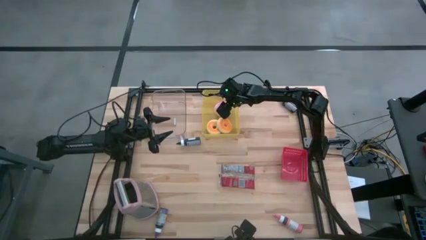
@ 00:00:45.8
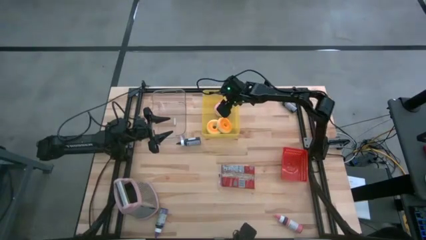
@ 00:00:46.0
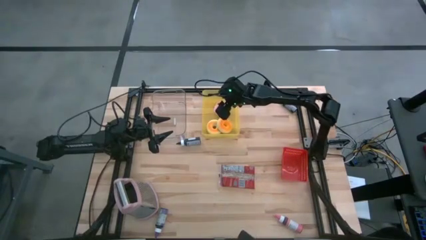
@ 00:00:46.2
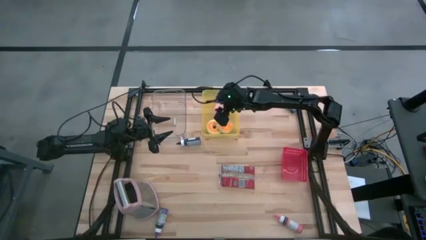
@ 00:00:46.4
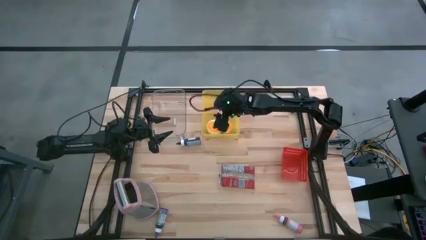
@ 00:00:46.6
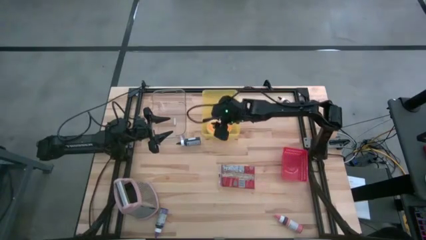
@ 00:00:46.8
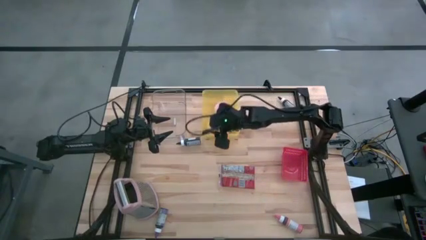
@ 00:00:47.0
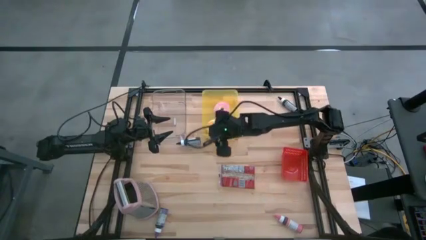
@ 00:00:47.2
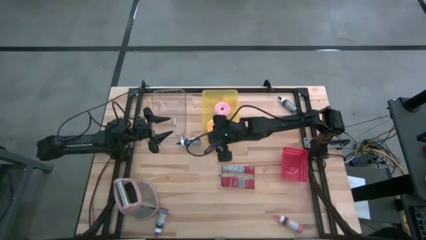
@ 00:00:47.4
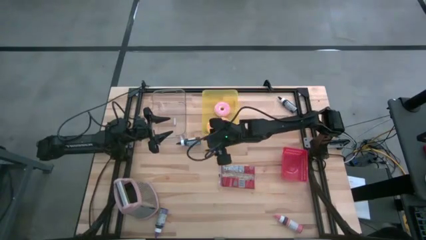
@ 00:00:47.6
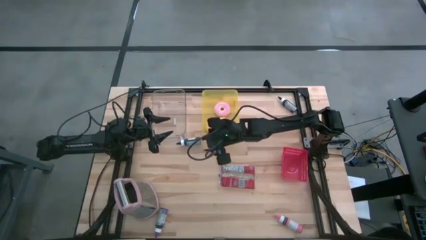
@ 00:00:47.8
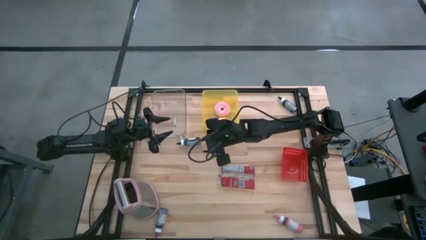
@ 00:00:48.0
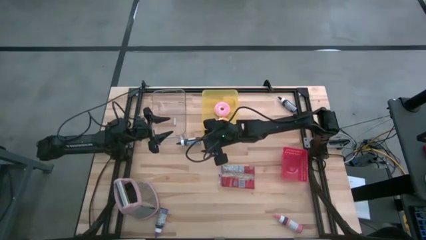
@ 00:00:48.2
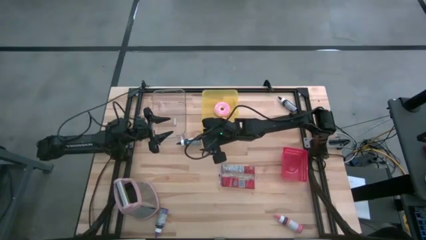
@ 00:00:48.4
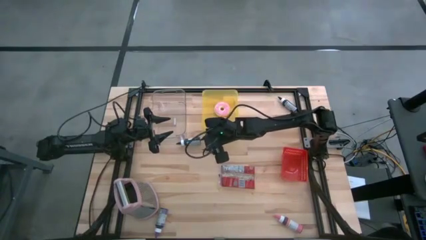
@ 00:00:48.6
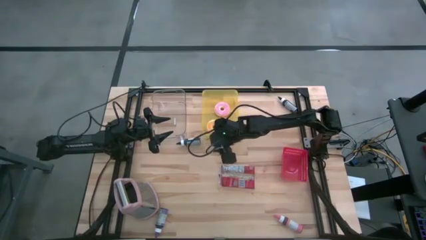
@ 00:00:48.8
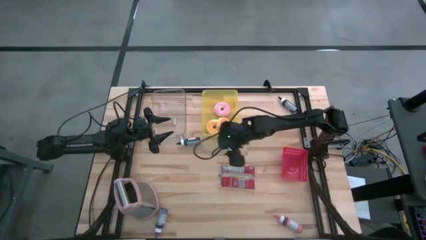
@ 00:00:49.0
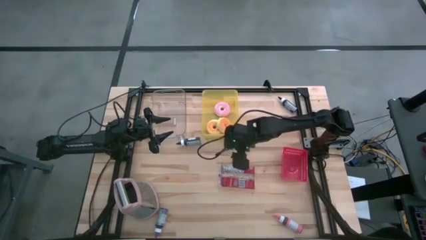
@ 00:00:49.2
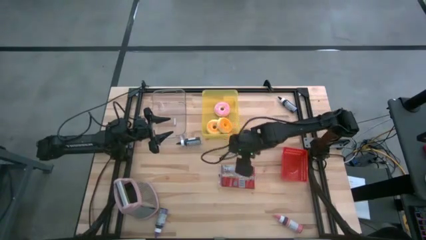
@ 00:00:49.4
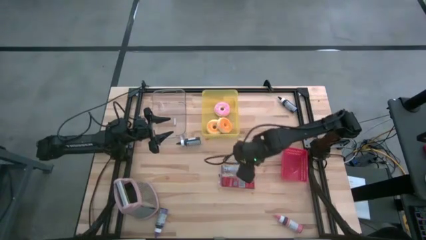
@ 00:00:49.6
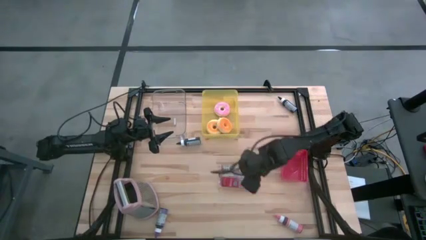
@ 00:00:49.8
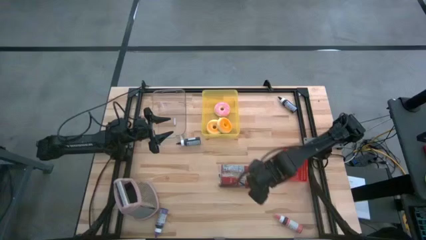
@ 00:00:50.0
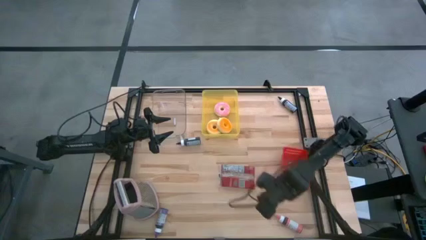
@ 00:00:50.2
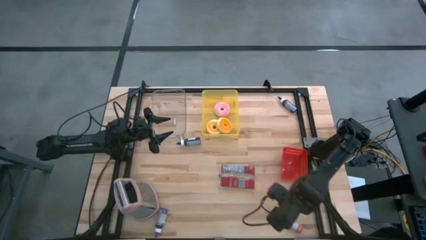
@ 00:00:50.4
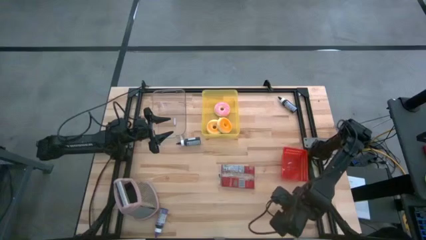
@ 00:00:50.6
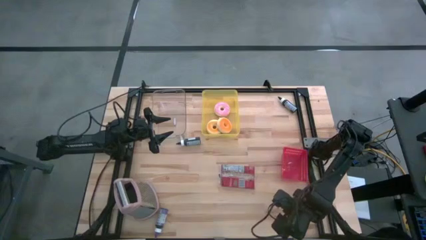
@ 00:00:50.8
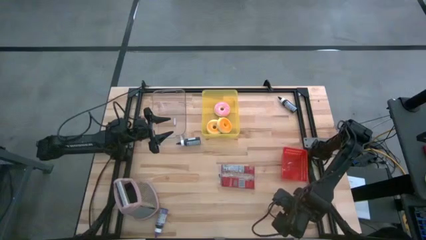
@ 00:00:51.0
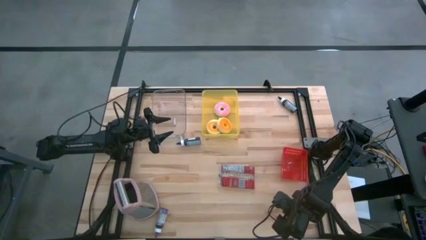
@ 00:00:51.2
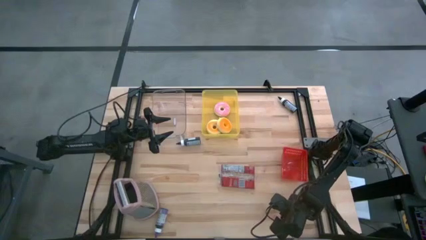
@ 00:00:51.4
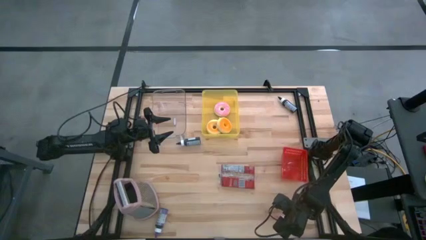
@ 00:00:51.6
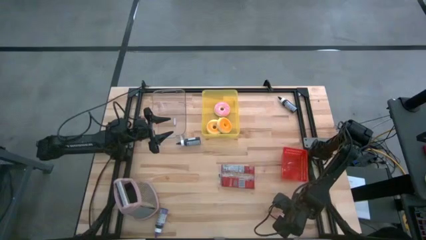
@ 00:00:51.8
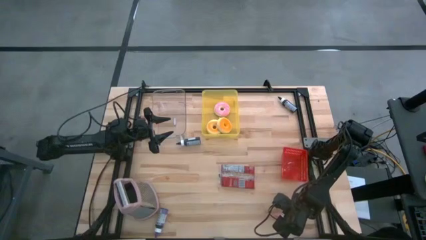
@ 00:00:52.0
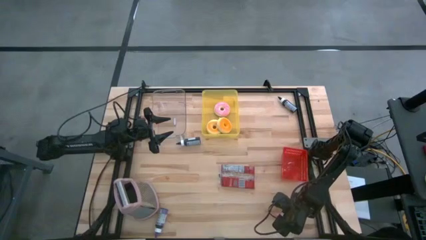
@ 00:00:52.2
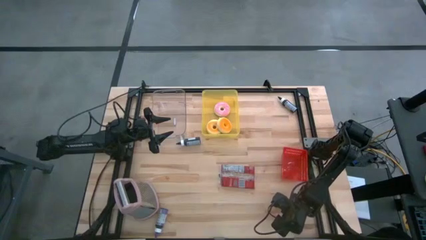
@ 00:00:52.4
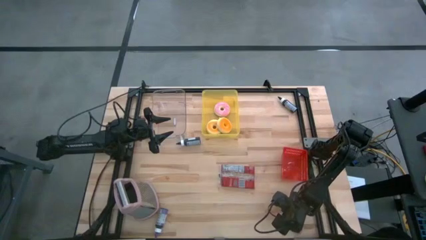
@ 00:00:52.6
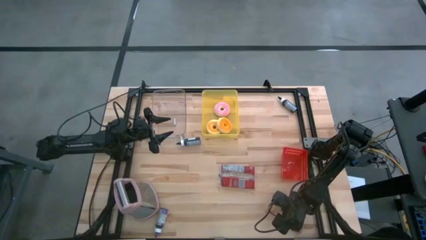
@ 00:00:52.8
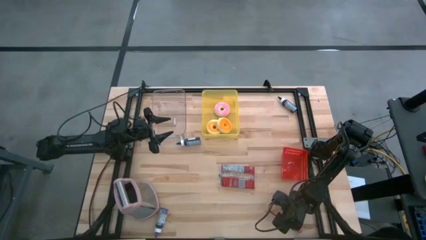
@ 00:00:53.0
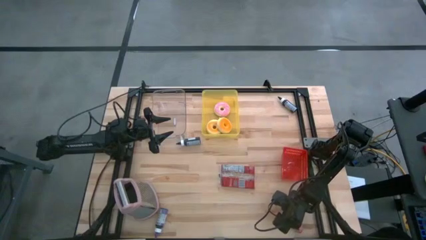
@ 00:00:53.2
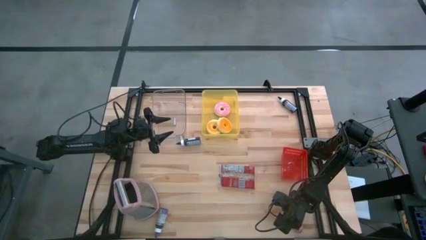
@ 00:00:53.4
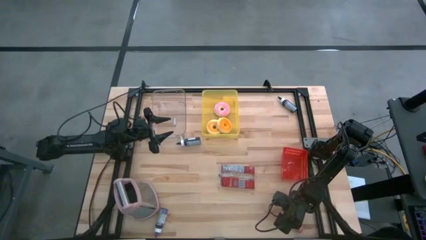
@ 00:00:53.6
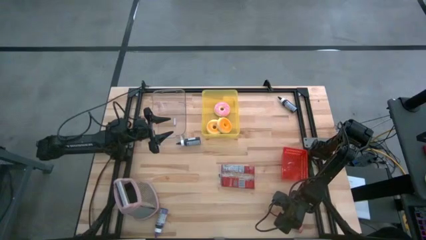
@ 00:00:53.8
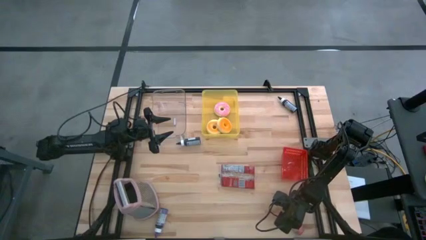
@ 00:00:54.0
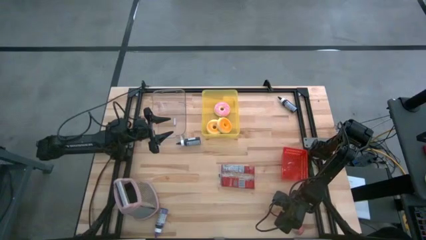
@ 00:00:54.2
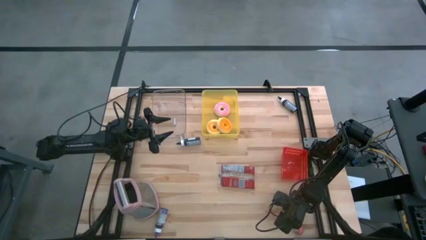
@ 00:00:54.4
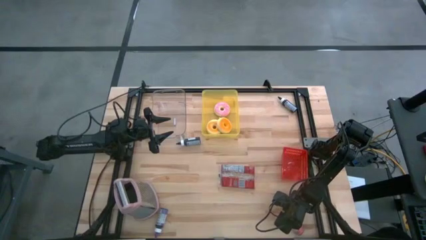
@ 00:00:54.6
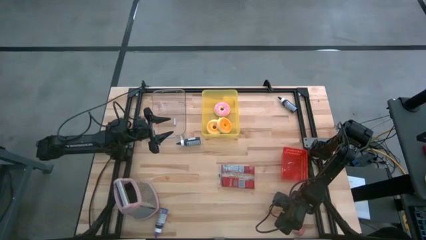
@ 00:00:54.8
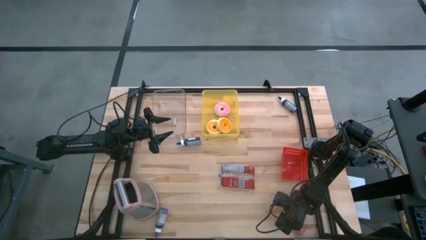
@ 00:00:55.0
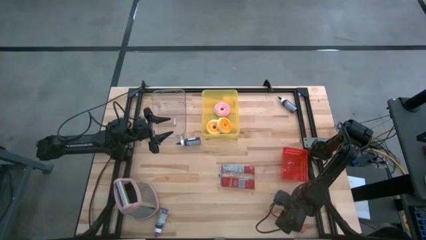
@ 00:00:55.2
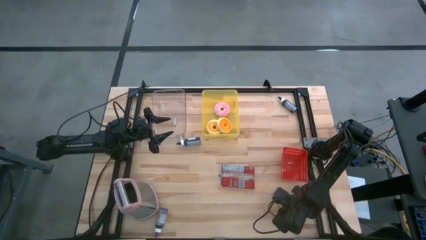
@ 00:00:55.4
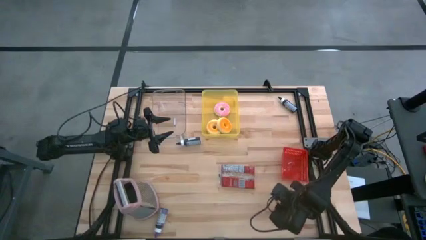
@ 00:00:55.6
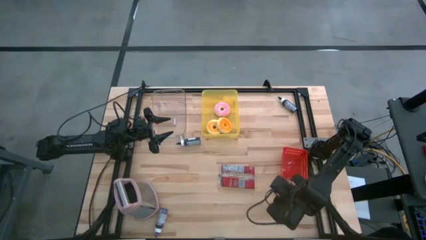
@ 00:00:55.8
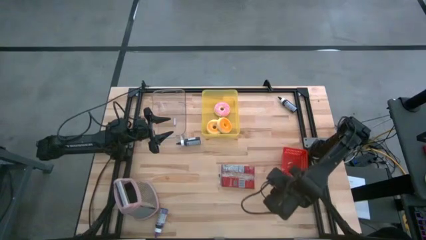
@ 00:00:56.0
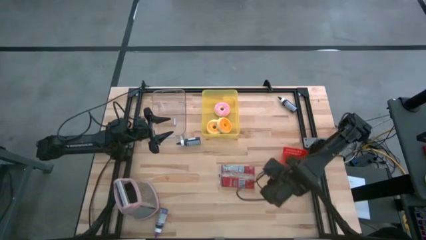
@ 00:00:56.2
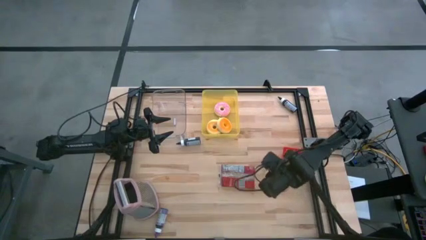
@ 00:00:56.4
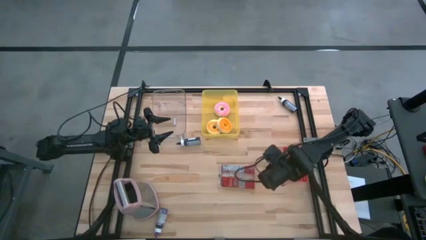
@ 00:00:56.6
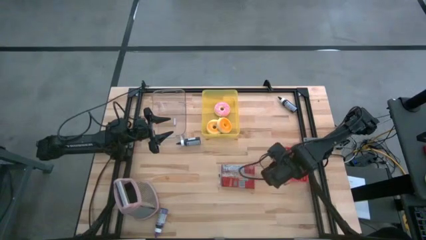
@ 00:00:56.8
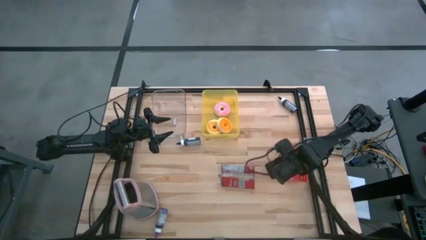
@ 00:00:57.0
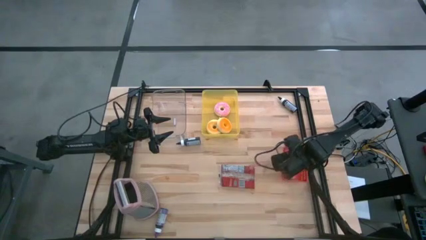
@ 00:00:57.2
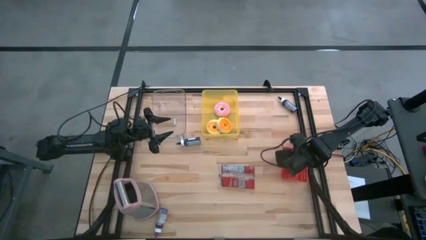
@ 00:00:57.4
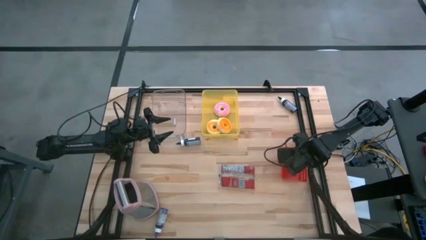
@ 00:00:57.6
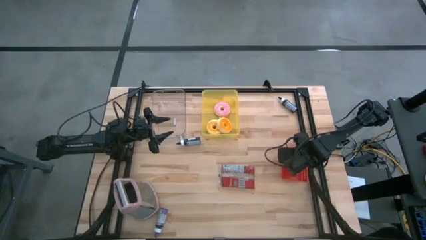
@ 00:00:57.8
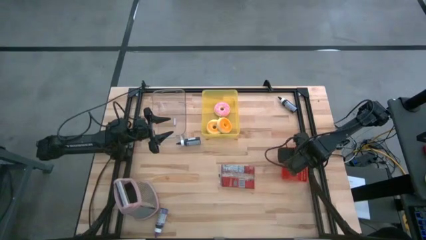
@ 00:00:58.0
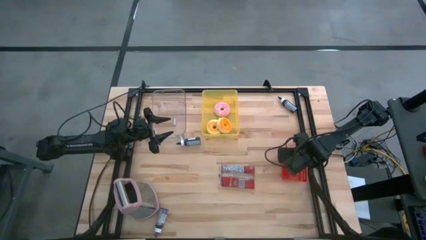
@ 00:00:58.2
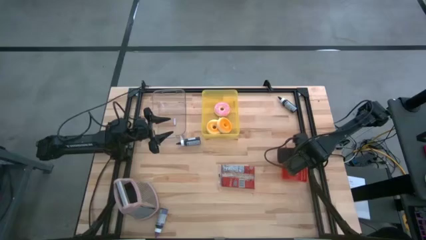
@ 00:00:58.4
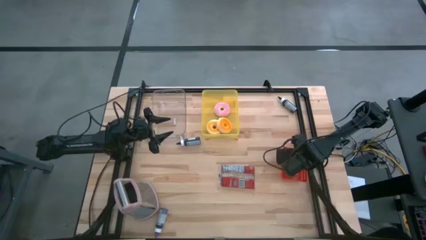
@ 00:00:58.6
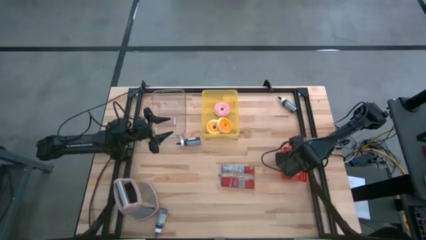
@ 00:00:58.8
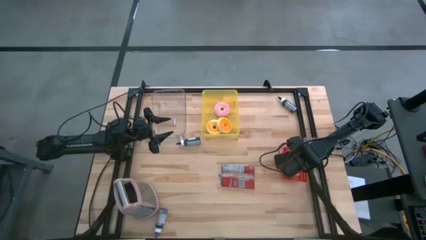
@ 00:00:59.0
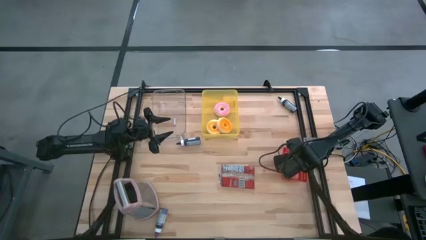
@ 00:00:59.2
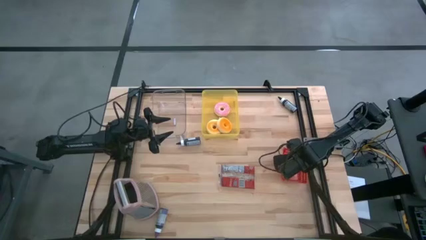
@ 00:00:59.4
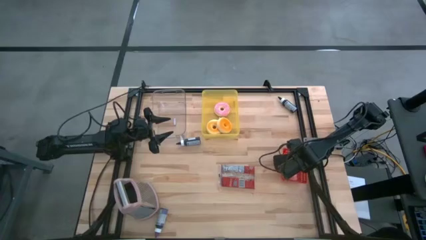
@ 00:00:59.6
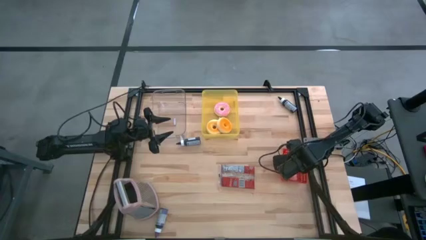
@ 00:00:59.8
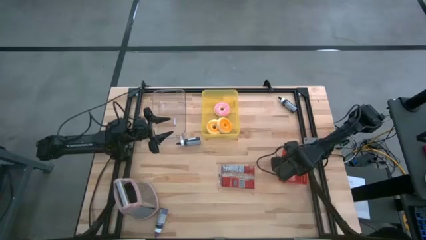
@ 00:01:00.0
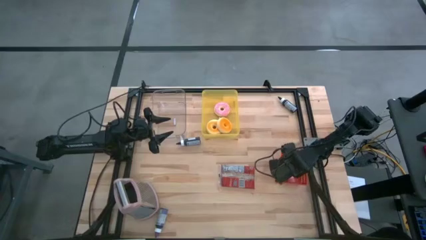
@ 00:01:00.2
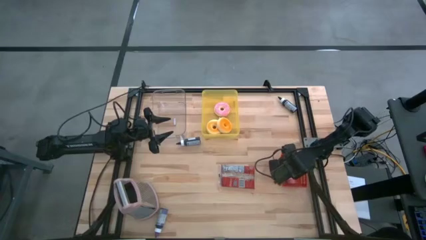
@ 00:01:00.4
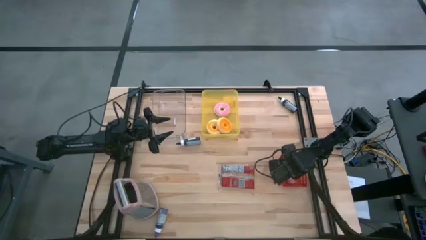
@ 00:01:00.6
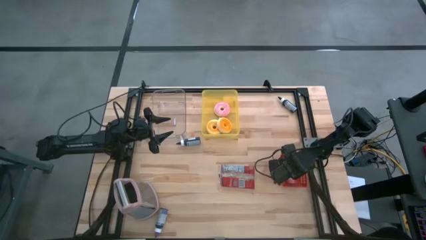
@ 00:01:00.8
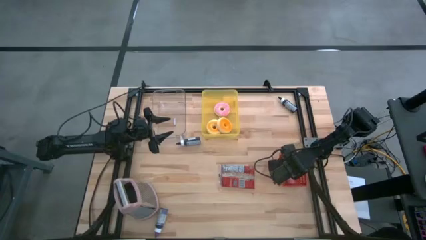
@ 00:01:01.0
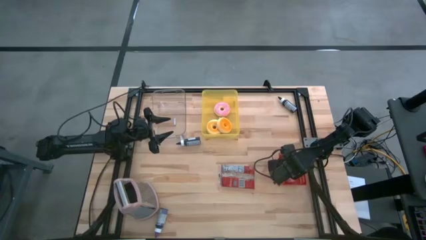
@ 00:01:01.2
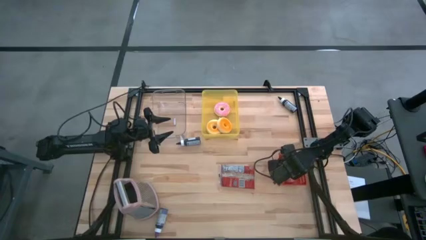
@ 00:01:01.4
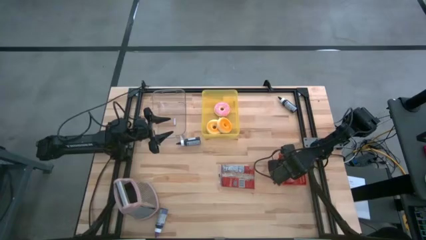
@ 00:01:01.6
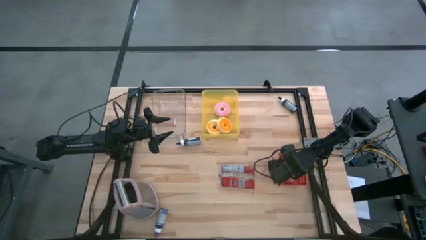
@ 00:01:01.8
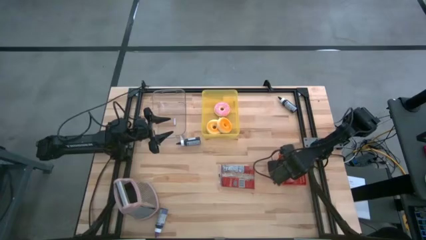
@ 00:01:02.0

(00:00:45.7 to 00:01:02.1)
Task: Pick & Place Food Item
Put the pink food coloring bottle into the red bin
